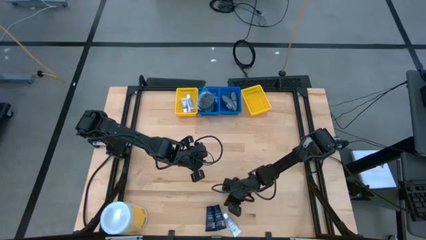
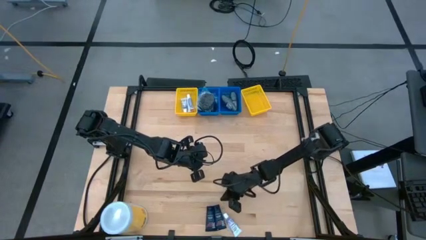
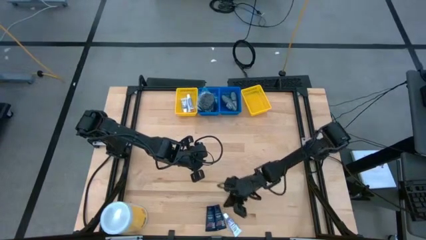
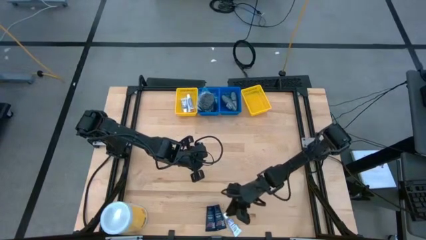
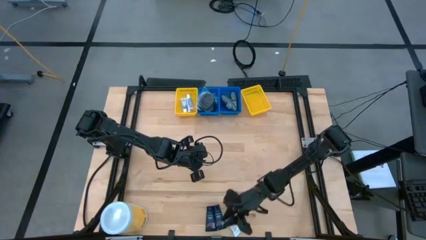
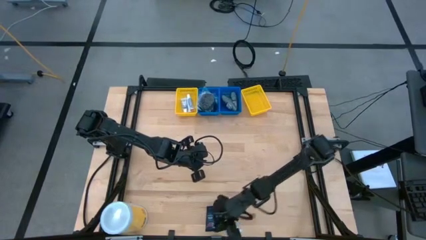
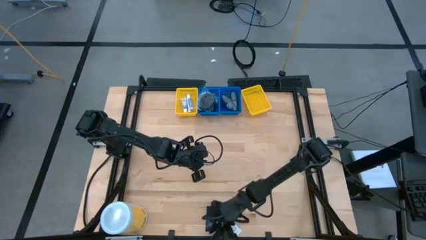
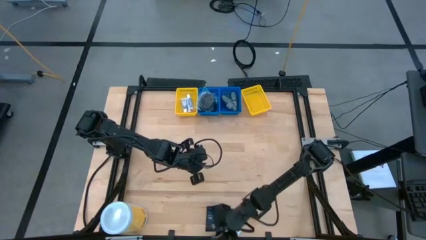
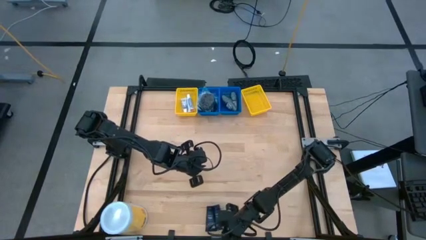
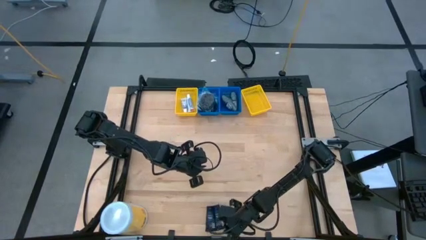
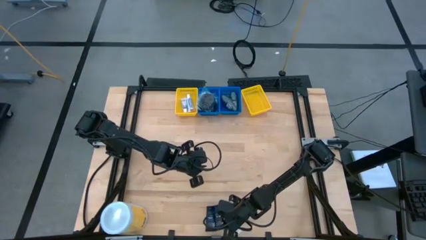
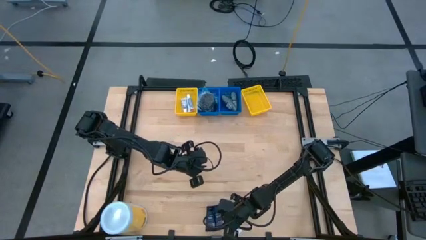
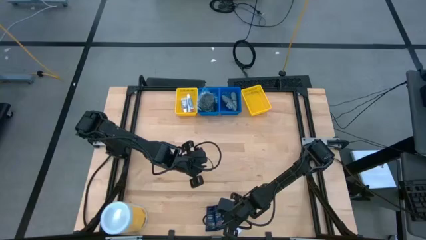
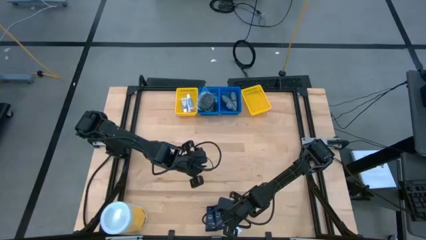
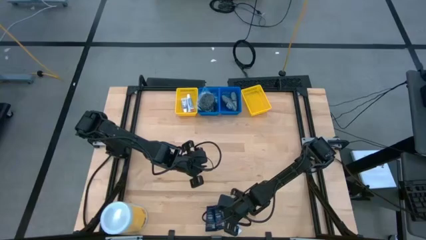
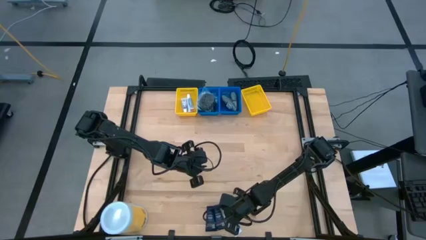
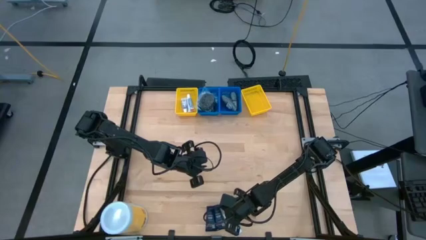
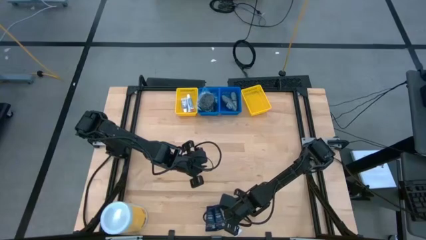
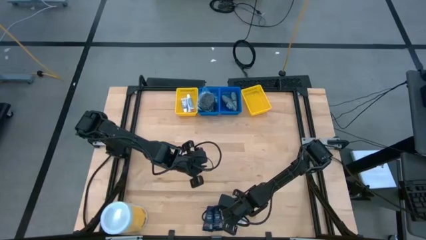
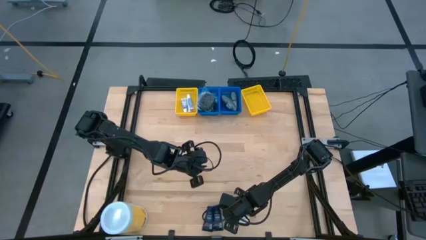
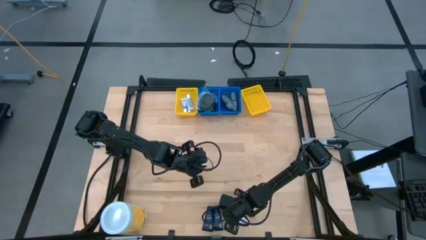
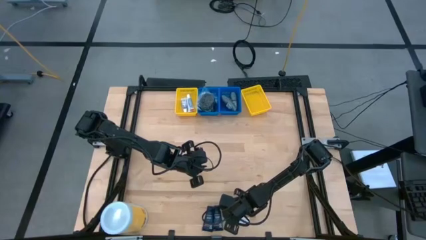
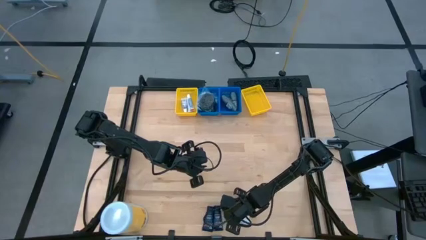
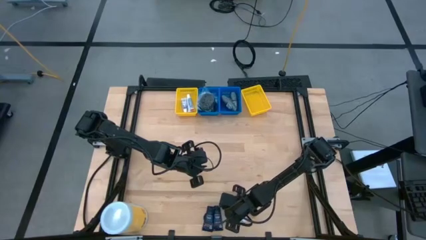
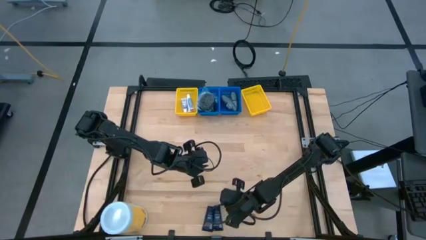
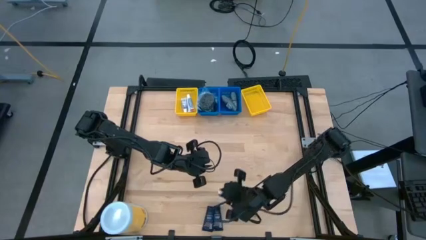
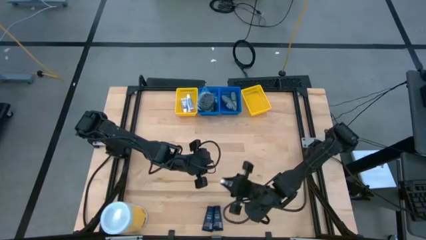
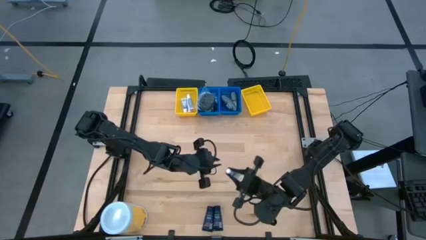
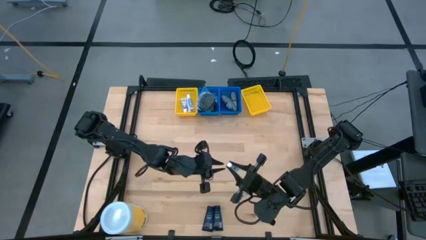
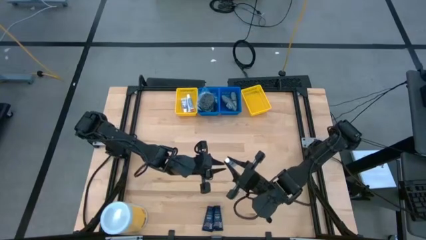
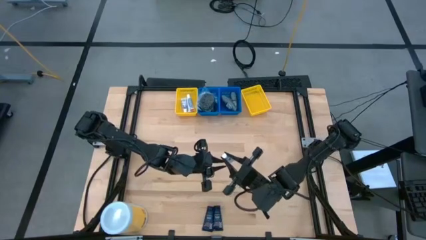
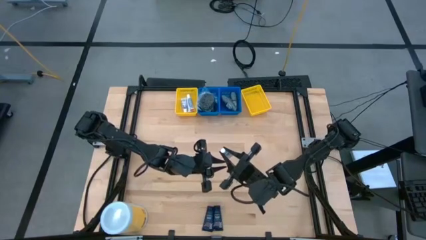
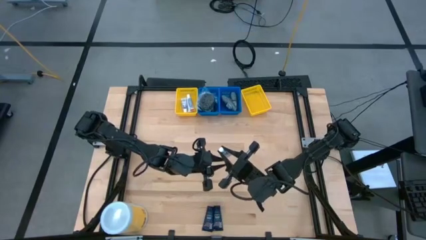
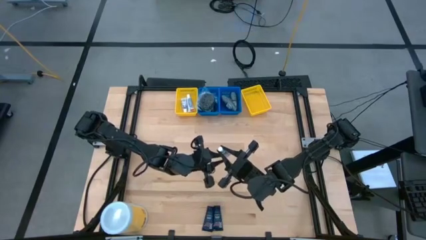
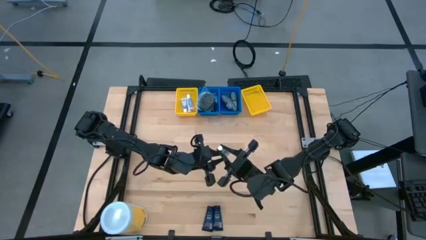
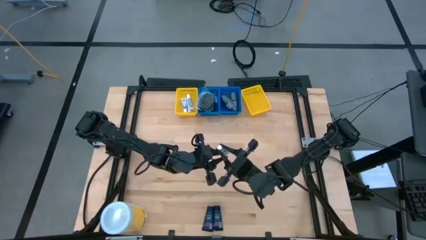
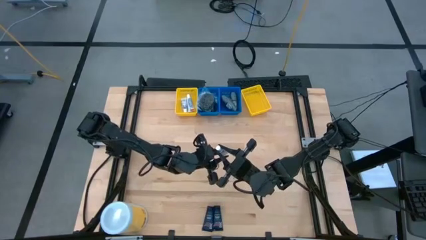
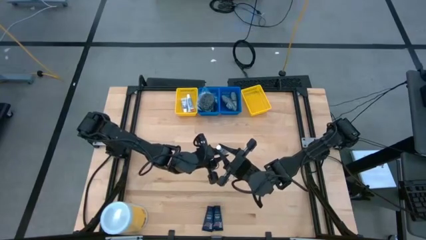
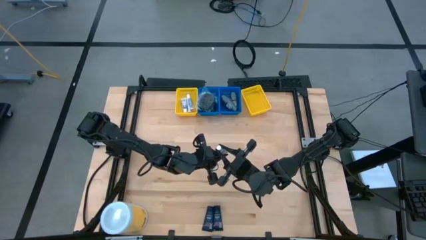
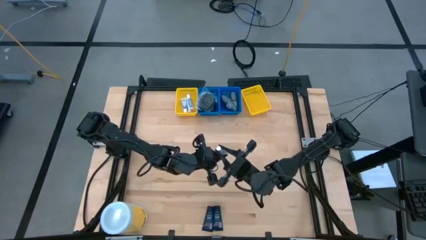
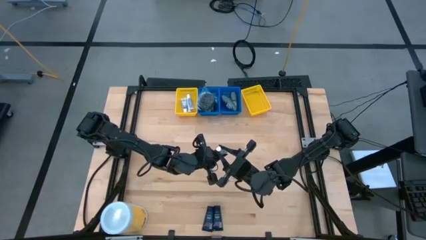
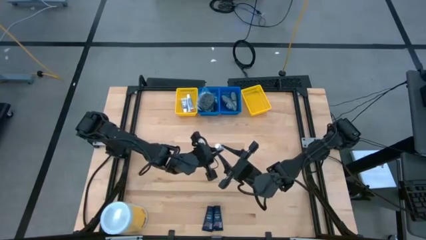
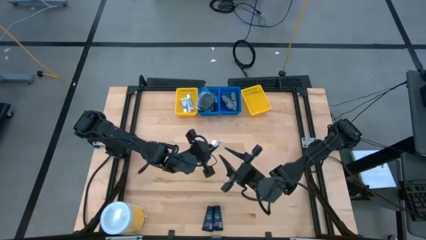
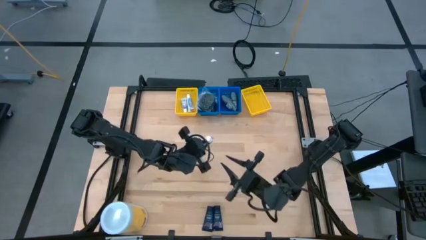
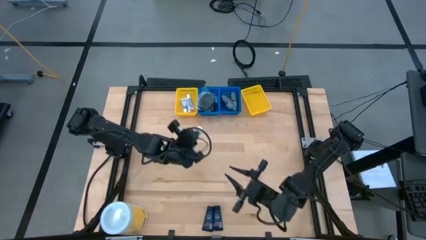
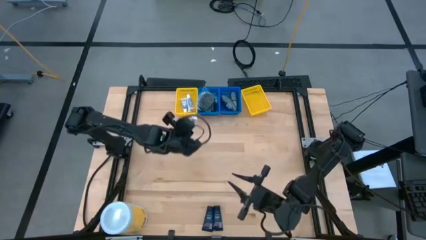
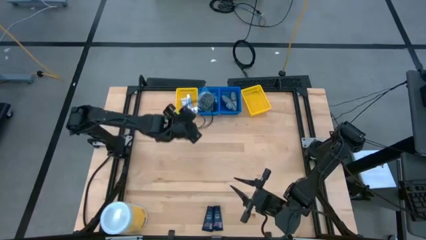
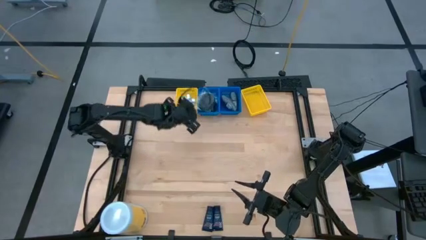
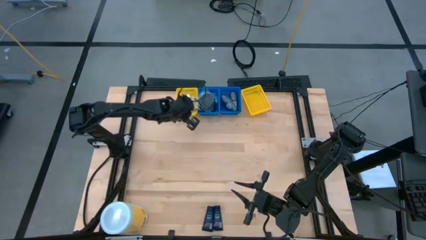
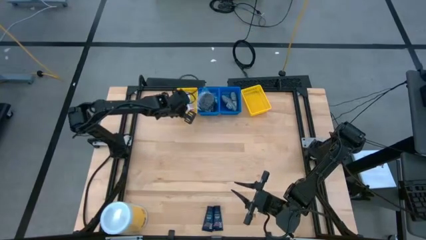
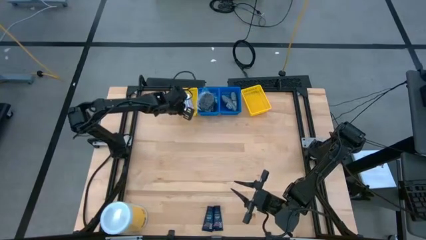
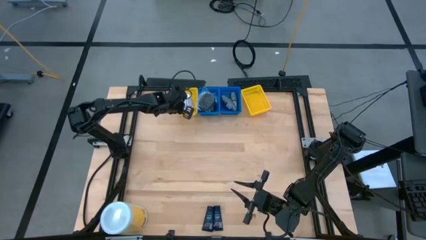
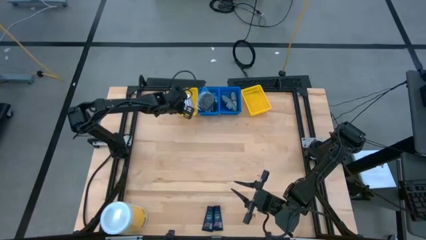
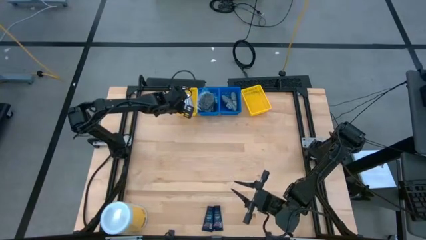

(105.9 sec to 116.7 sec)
Task: Pick & Place Travel size toiletries
Put the toothpaste into the left yellow bin
